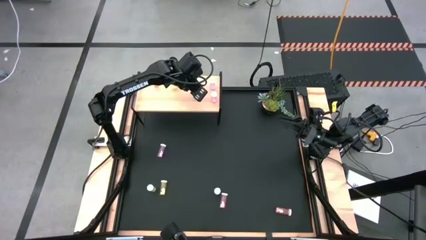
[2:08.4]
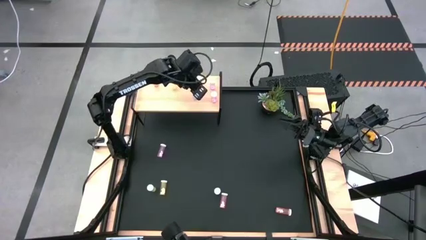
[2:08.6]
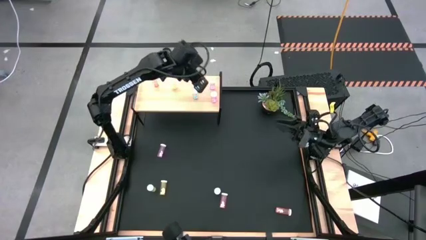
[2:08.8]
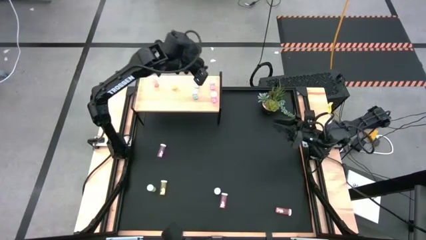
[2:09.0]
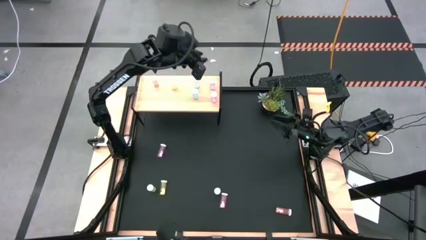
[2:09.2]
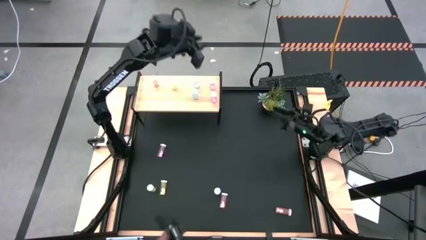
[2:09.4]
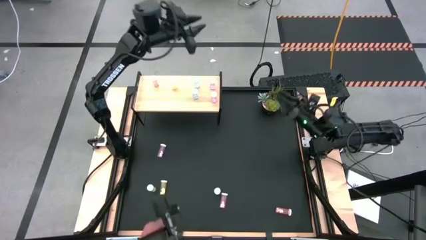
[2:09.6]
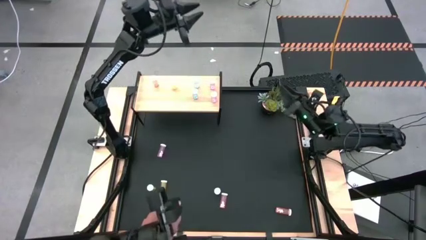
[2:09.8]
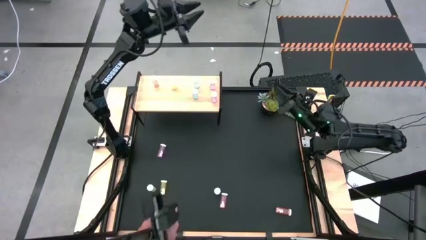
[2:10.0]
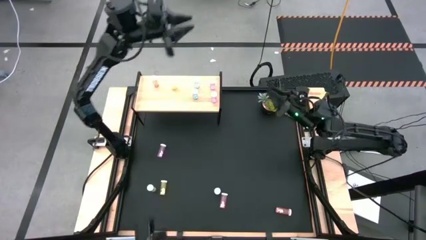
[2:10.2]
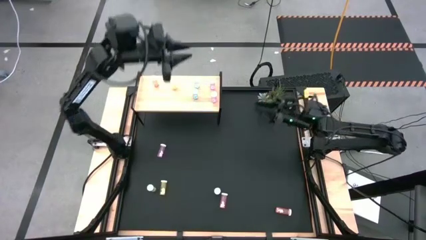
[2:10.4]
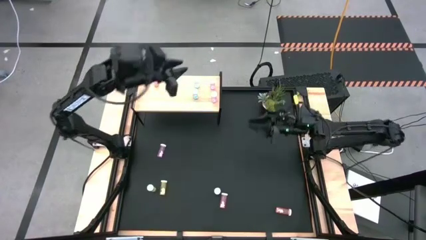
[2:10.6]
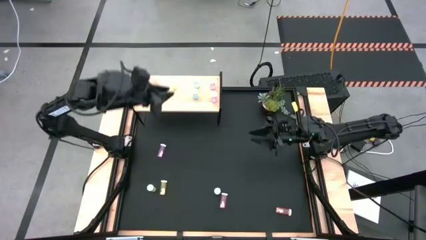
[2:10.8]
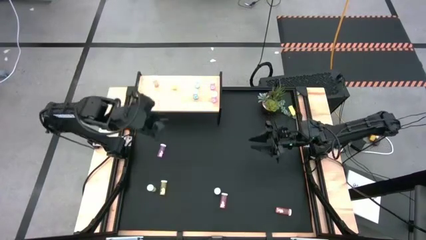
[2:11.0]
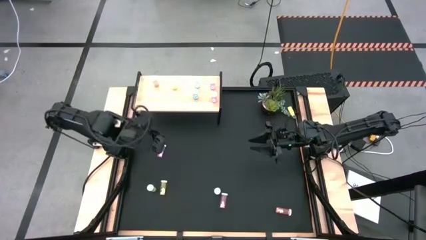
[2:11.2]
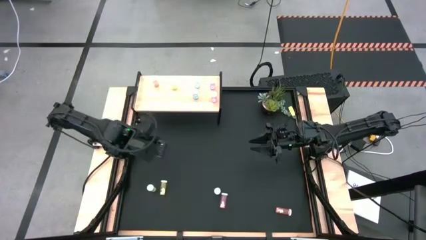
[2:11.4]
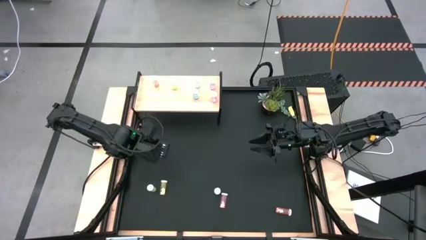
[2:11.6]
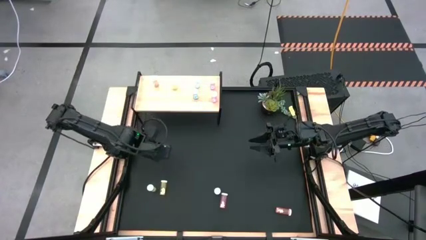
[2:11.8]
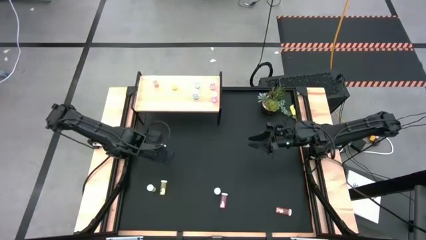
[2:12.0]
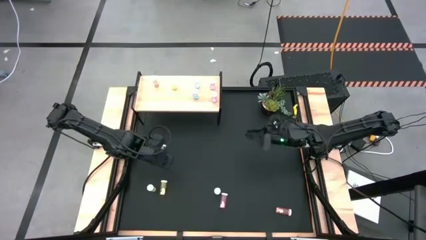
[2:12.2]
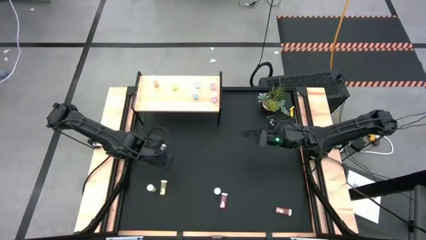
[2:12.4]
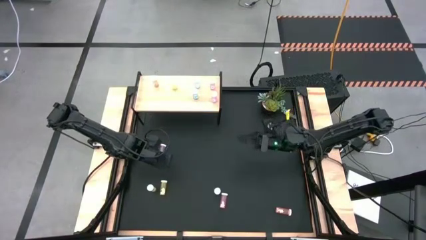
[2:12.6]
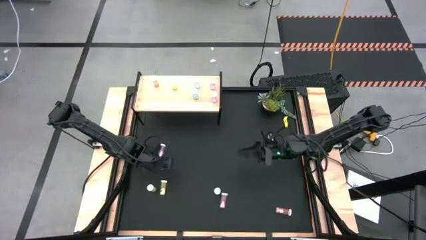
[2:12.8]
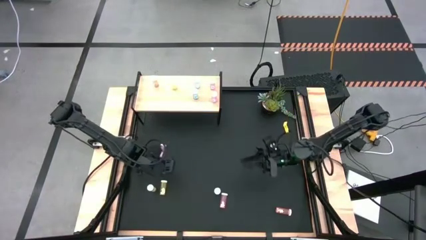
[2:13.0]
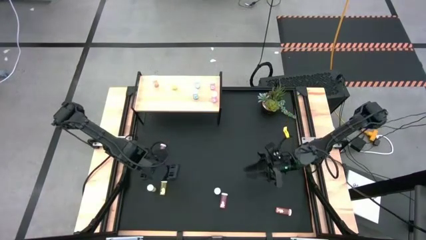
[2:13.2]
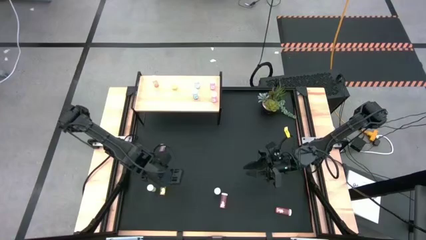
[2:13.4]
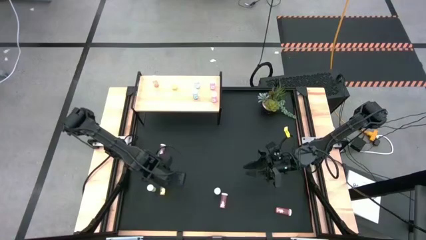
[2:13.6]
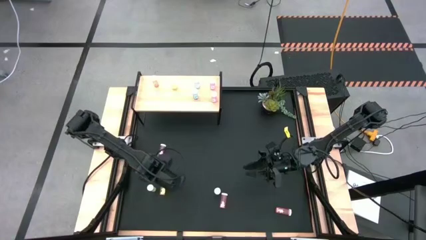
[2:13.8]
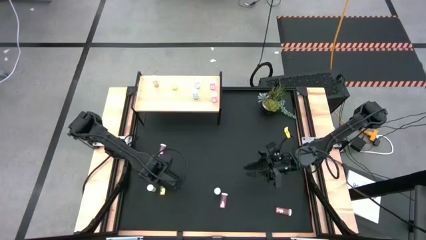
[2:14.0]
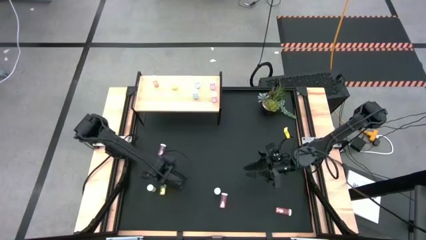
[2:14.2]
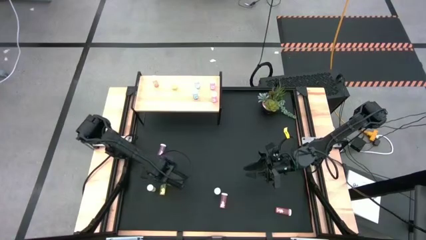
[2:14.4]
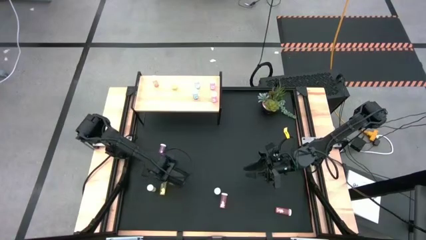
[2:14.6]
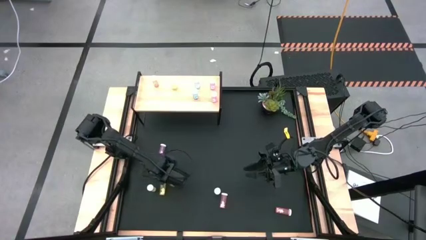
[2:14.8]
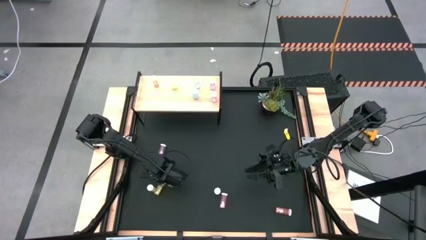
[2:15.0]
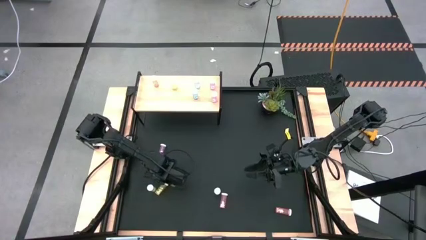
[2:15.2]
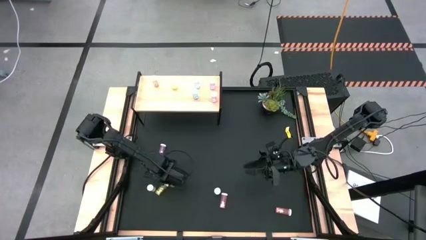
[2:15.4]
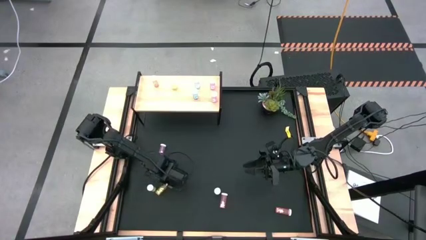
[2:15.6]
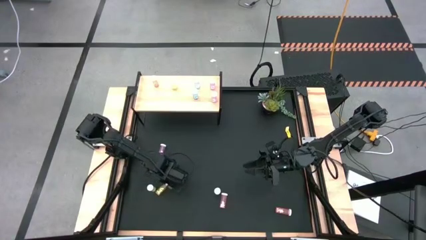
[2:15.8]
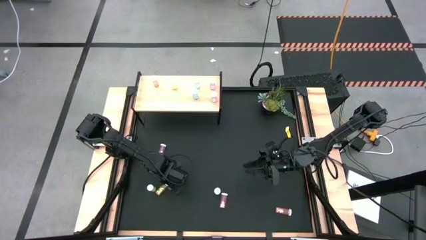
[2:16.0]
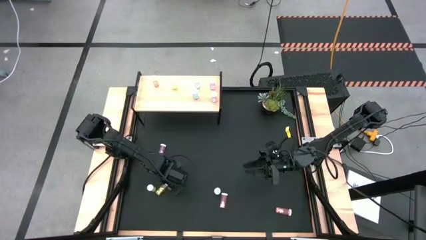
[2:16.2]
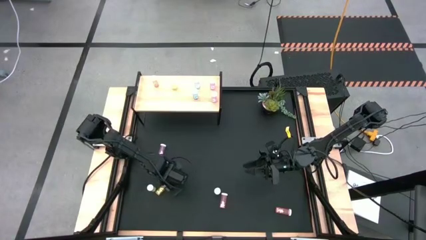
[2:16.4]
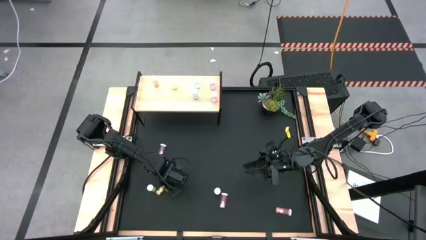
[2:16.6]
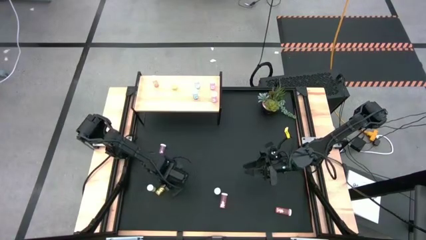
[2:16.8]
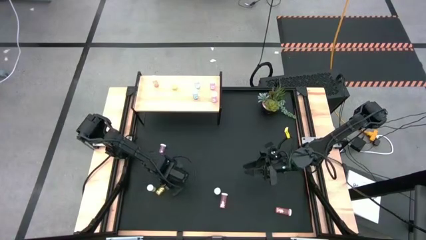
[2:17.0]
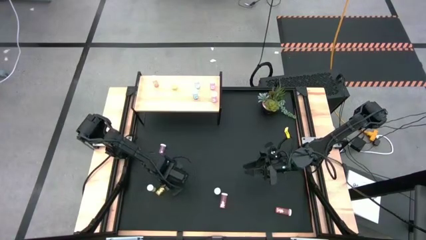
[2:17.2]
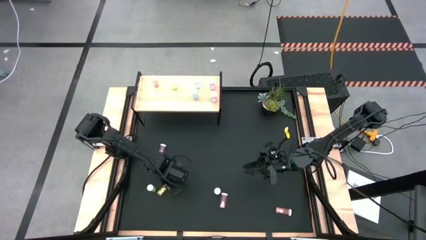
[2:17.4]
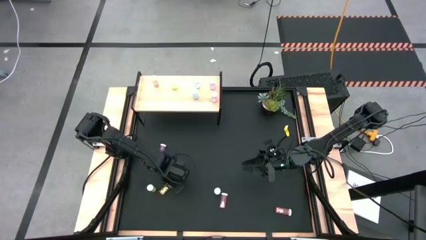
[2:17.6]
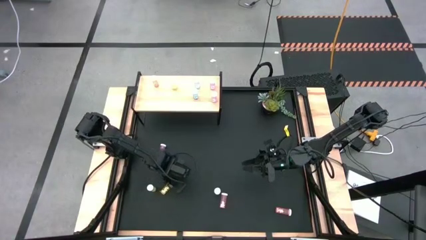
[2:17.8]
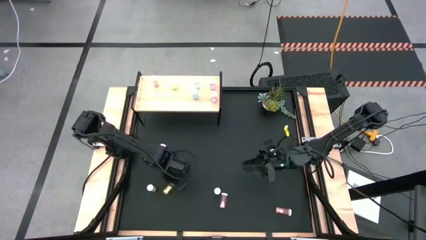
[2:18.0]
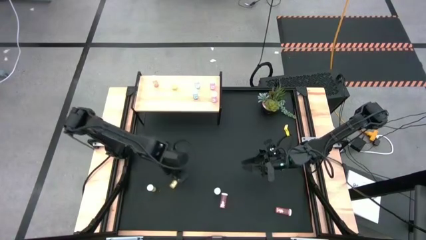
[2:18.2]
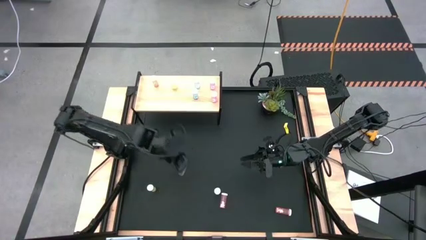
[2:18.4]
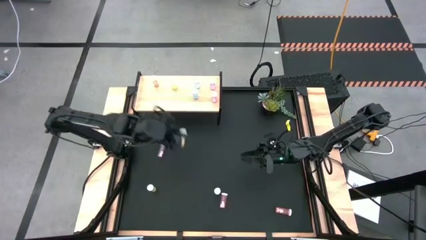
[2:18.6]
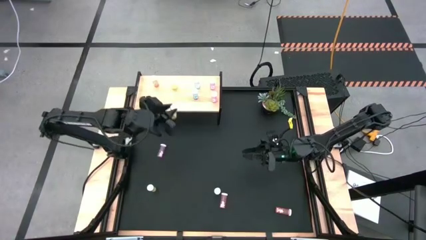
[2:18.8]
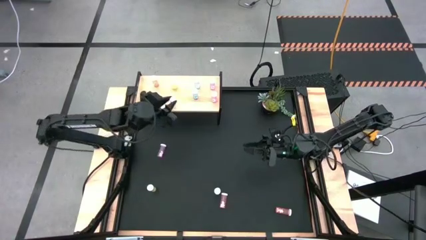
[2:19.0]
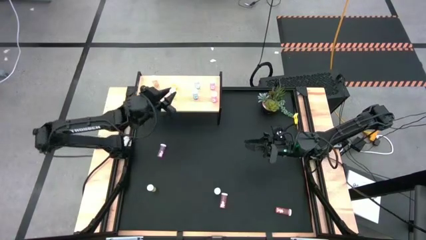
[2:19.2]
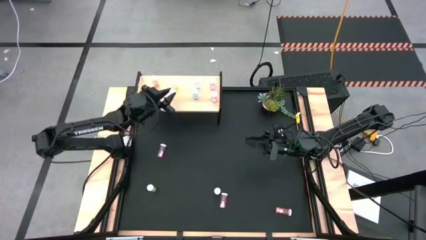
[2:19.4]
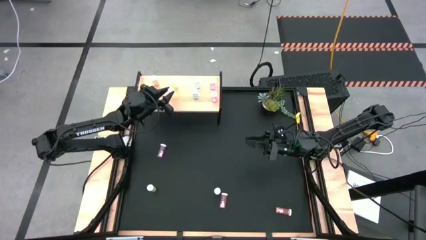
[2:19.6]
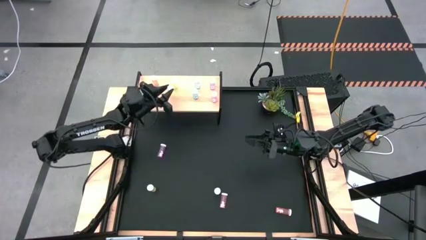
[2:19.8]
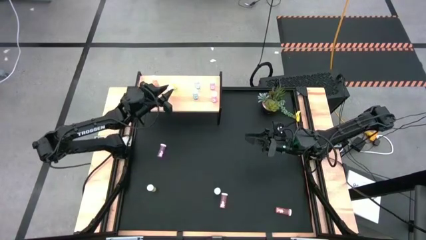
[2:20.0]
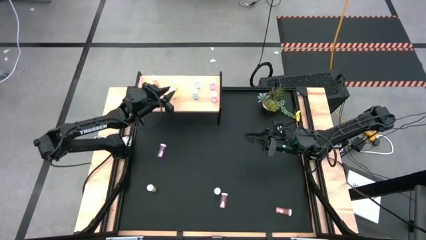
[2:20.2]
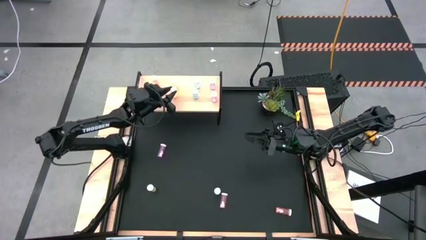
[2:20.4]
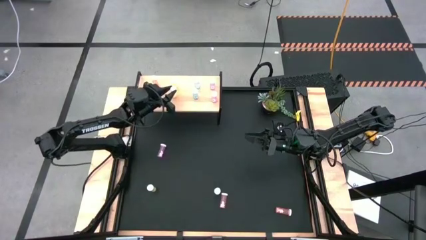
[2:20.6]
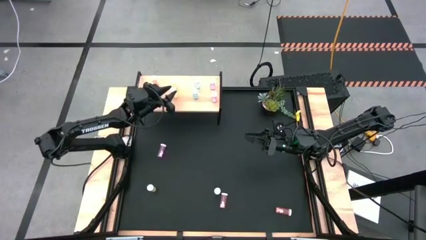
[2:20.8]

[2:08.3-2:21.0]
Task: Pick and place medicine bottles onto shelf by color
Put the right yellow pill bottle on the shelf aligned with the other yellow pill bottle

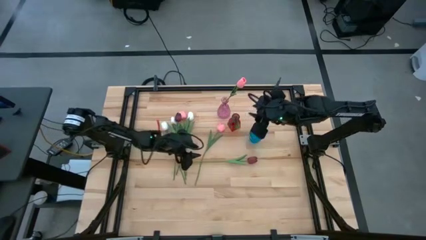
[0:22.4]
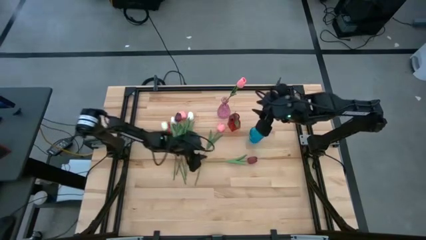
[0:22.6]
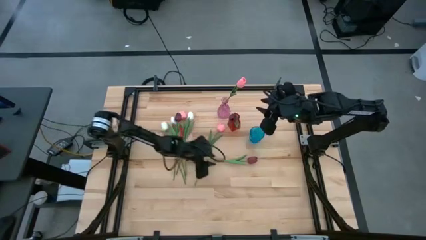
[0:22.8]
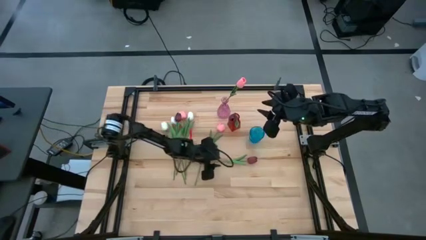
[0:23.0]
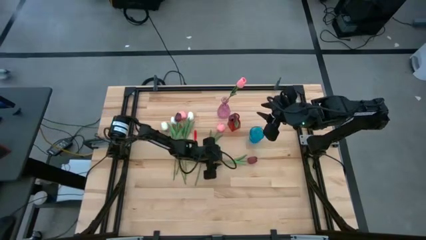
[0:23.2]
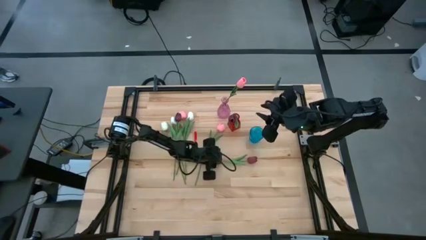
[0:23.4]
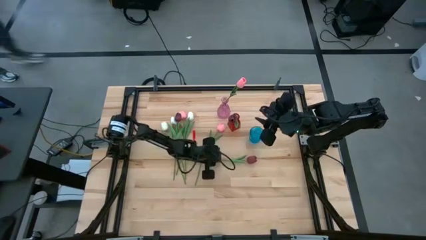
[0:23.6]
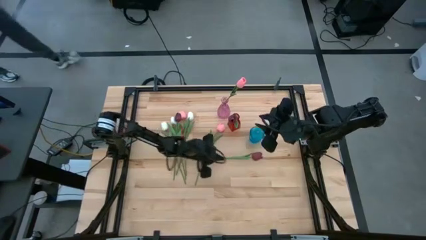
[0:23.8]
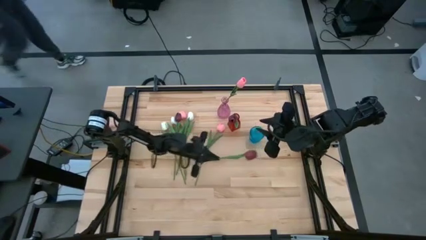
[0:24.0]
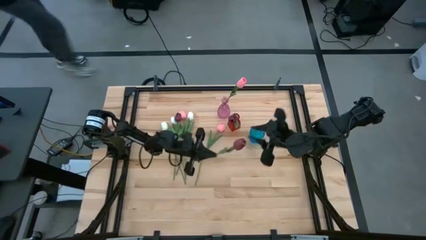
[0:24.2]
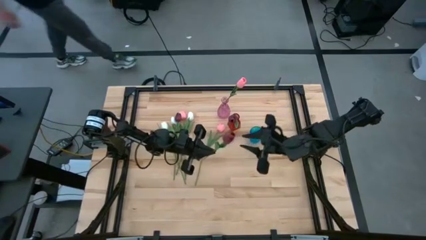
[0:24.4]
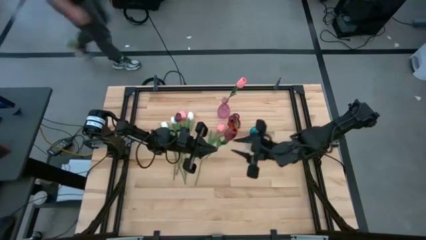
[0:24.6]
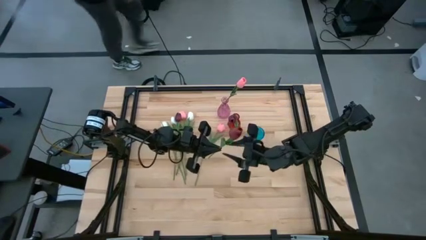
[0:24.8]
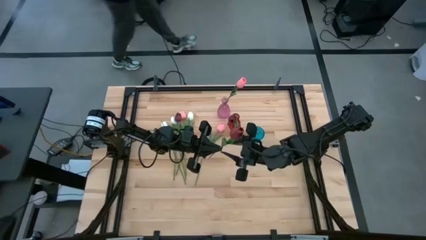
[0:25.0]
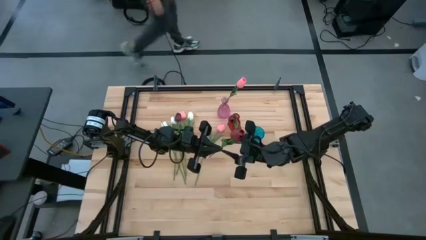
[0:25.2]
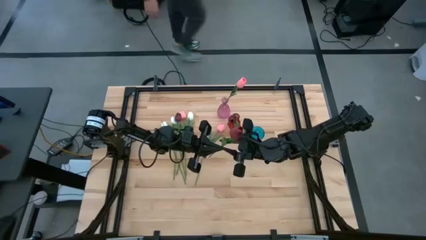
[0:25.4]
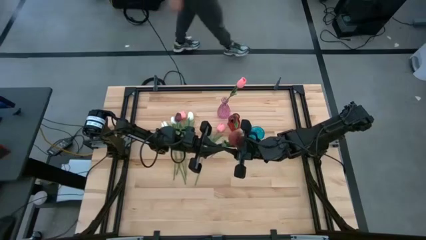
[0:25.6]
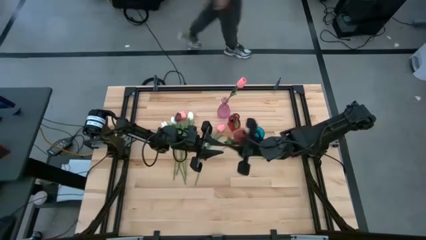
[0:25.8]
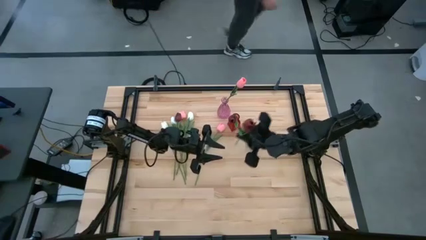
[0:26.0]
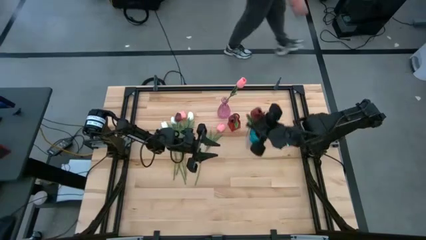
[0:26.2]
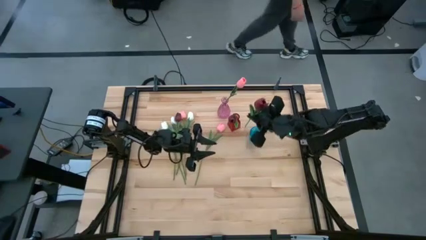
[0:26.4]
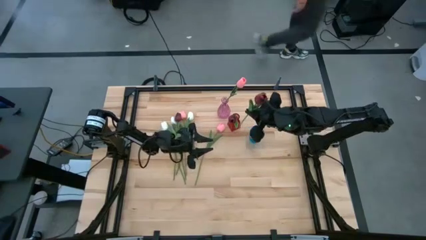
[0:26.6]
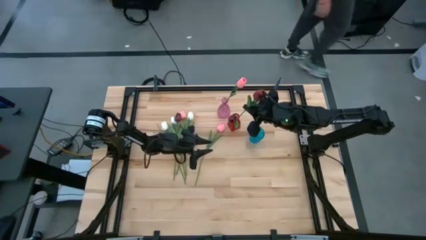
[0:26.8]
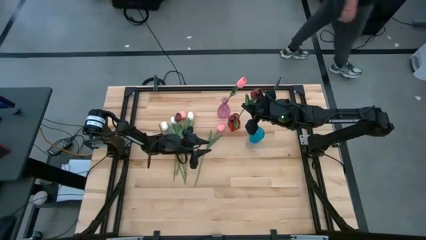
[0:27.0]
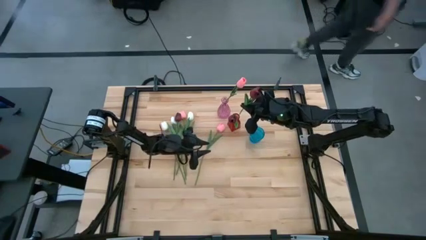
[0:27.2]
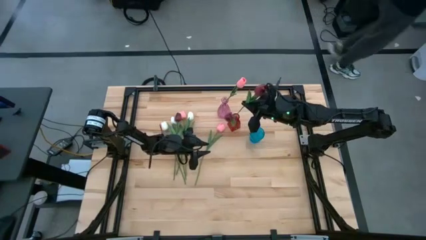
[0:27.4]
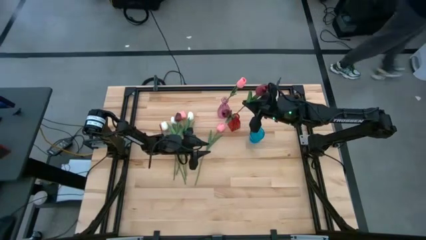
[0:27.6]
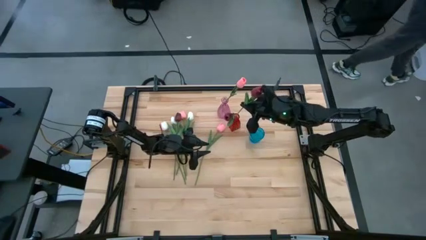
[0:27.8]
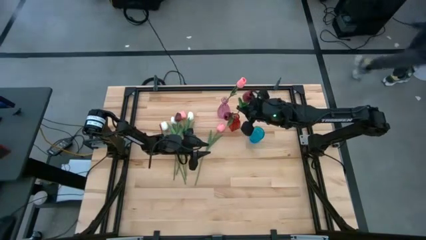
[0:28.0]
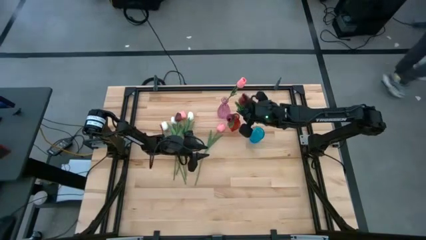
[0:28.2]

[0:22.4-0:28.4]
Task: Sort flowers into vase by color
Put the red flower into the red vase
